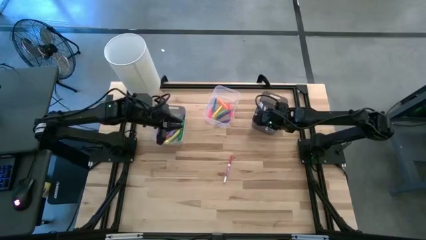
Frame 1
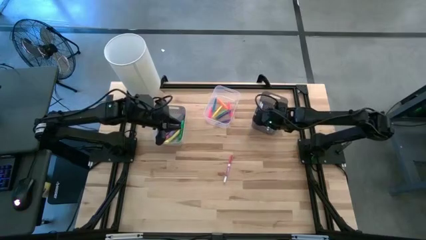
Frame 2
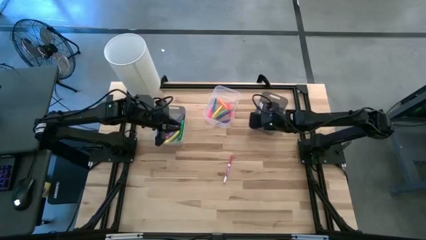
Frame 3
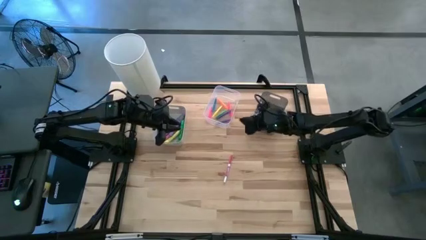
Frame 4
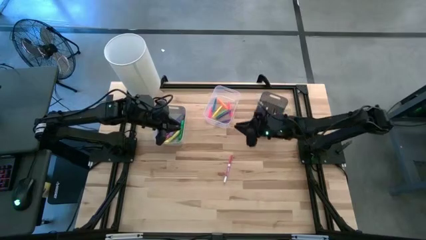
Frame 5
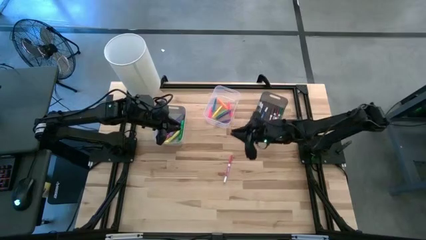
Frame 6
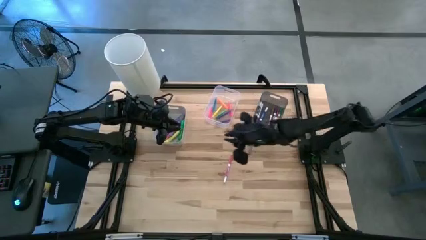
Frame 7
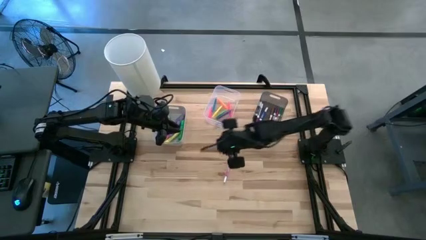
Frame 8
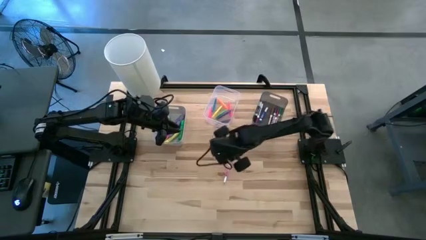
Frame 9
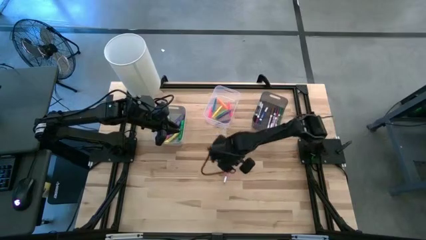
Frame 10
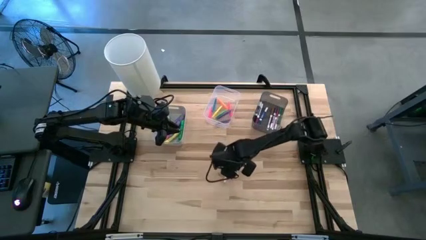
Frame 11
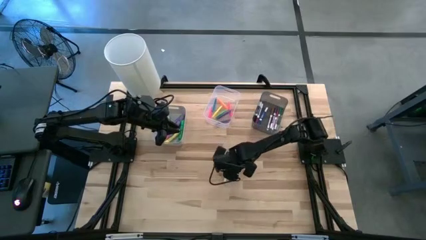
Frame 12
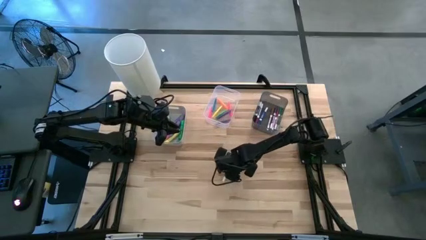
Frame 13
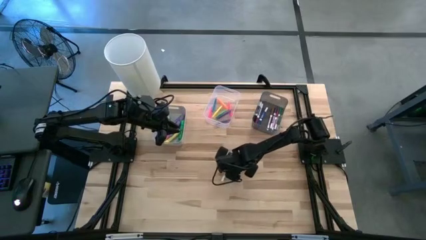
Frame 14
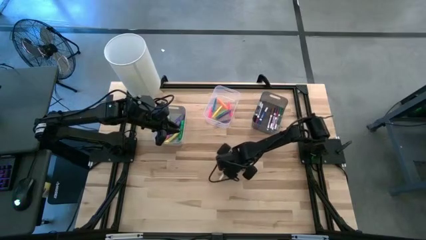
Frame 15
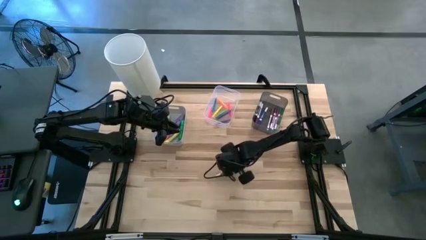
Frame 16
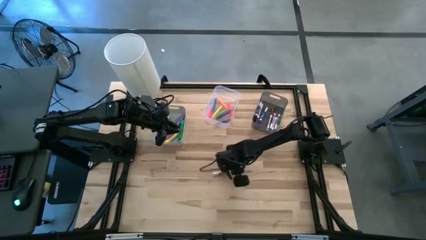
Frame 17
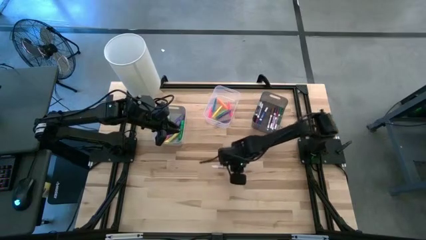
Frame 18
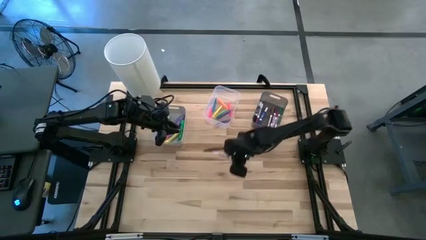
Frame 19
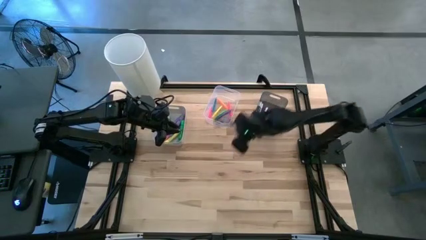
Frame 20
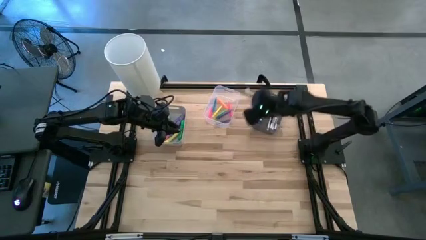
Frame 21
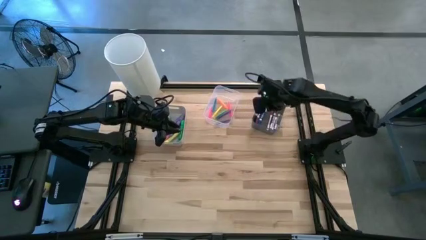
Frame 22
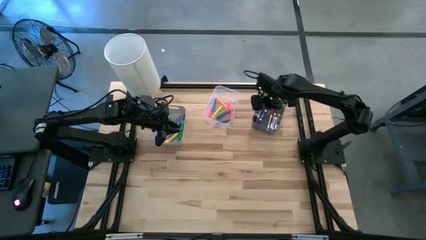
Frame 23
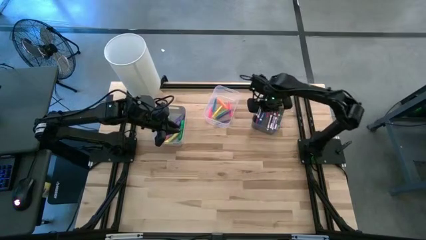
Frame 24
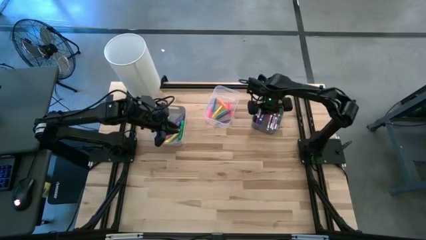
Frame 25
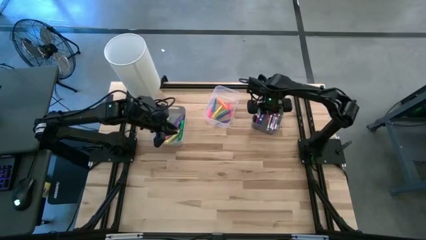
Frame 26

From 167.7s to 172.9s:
Task: Pick & Place Markers
Put the pink marker into the black bin

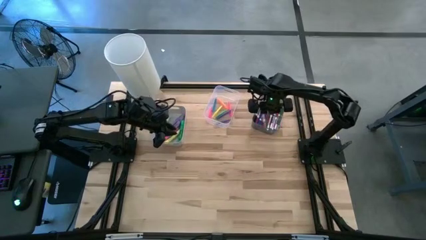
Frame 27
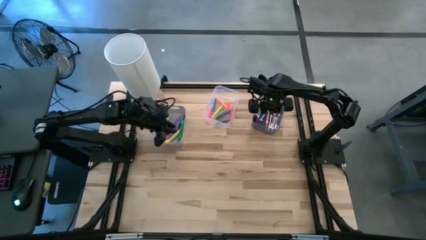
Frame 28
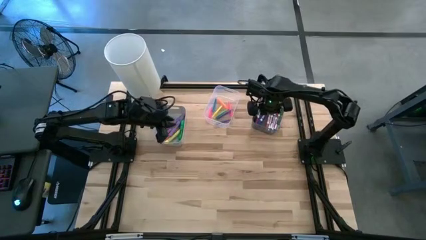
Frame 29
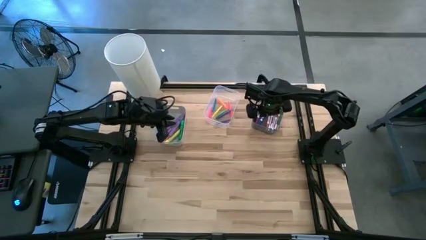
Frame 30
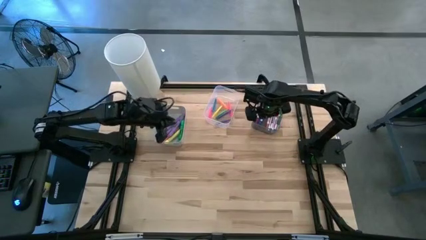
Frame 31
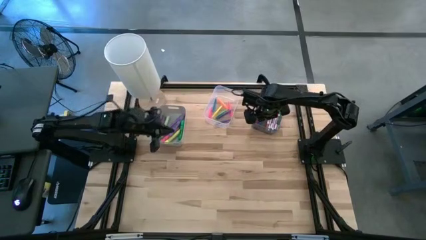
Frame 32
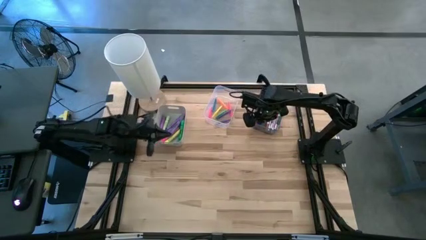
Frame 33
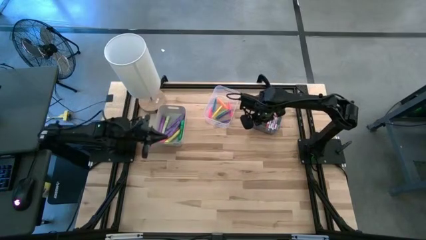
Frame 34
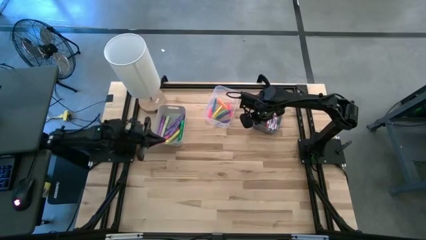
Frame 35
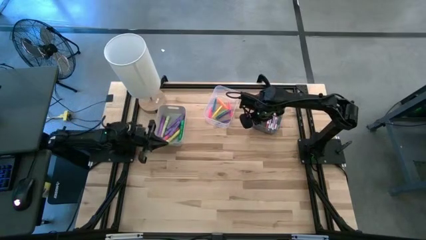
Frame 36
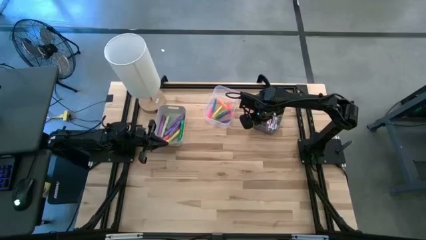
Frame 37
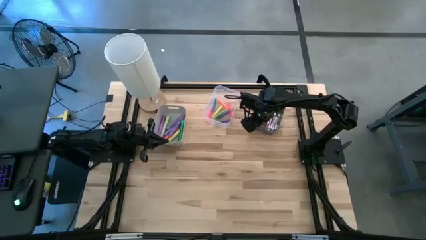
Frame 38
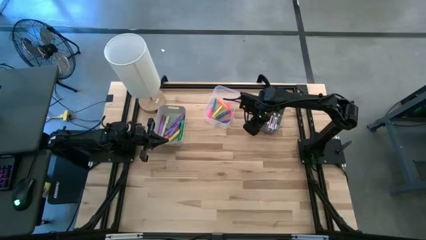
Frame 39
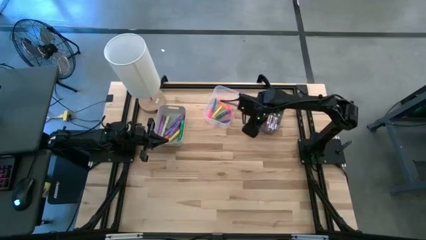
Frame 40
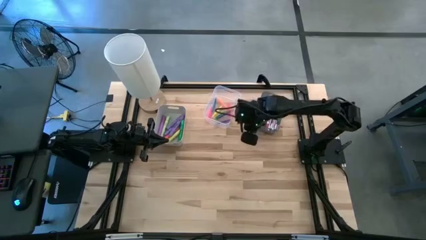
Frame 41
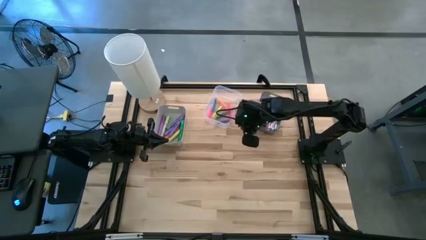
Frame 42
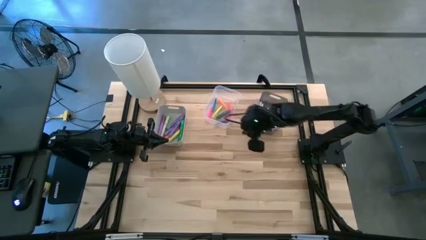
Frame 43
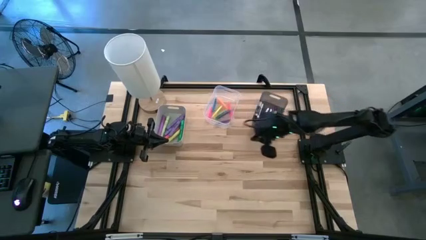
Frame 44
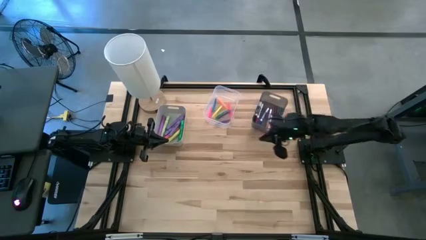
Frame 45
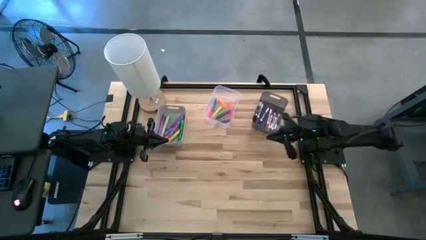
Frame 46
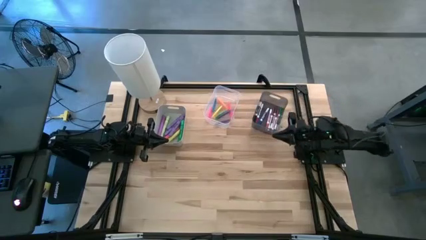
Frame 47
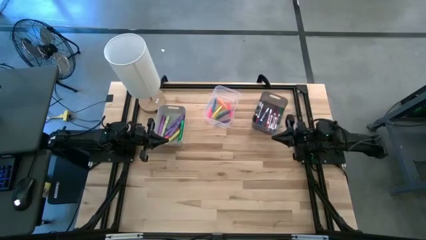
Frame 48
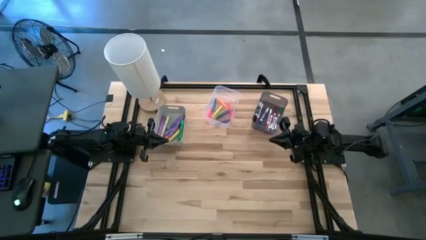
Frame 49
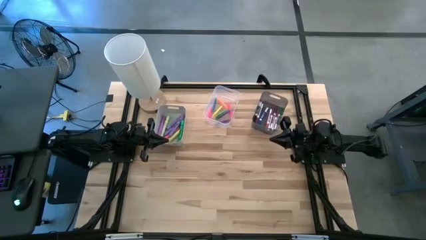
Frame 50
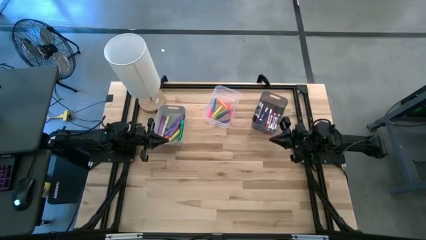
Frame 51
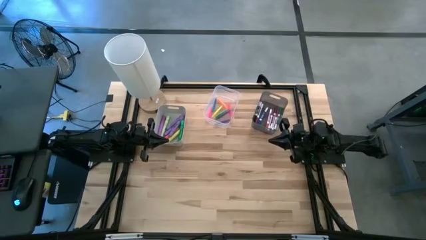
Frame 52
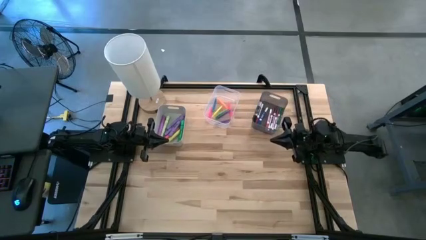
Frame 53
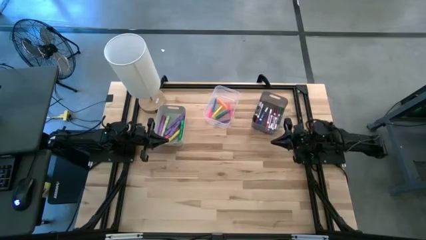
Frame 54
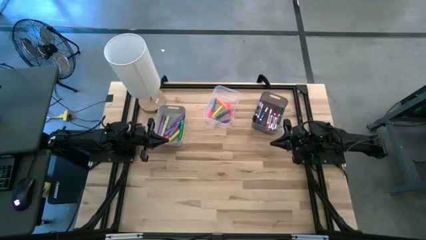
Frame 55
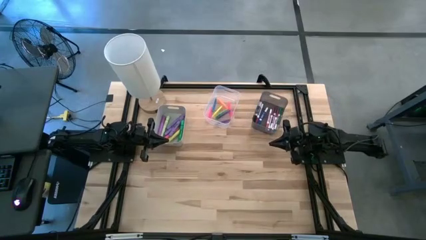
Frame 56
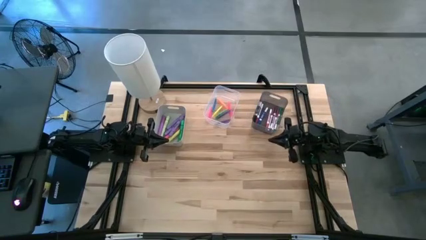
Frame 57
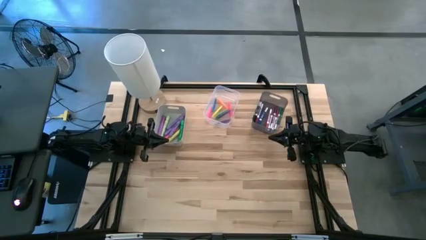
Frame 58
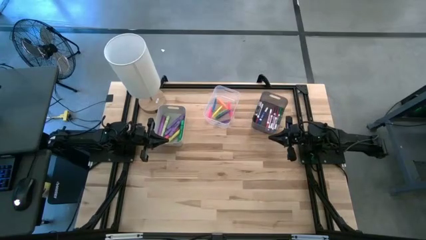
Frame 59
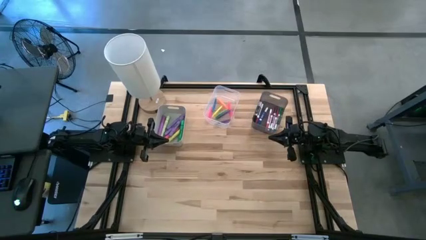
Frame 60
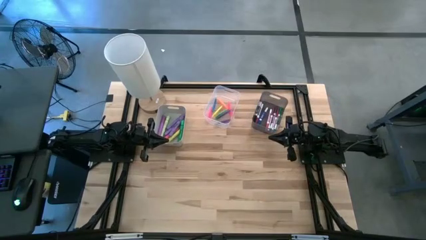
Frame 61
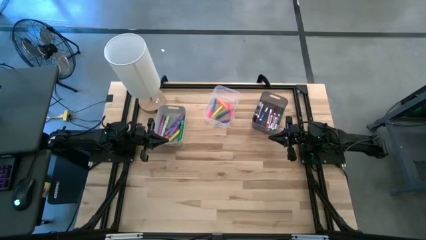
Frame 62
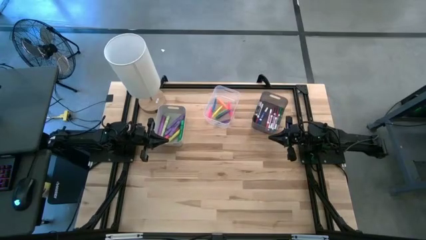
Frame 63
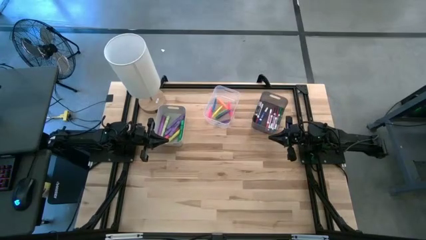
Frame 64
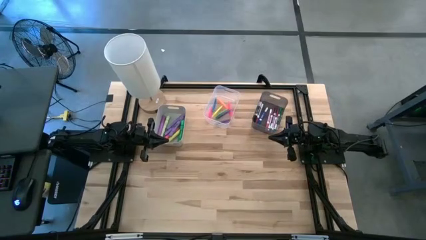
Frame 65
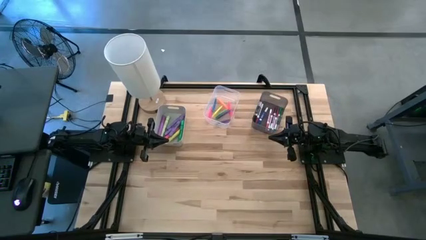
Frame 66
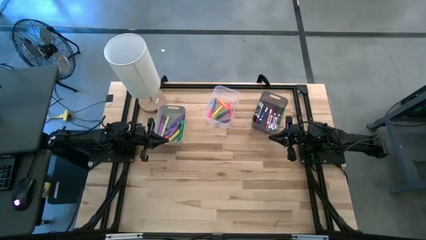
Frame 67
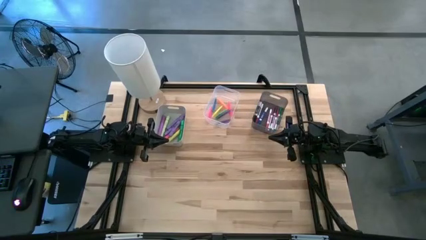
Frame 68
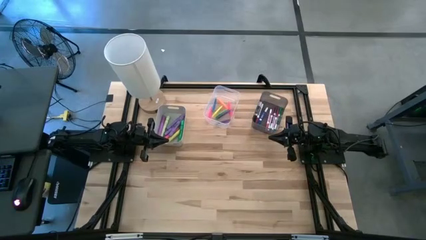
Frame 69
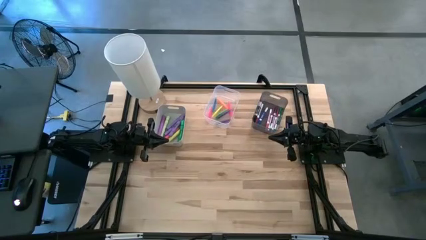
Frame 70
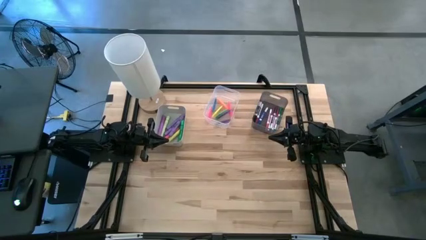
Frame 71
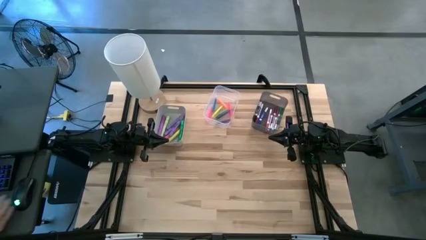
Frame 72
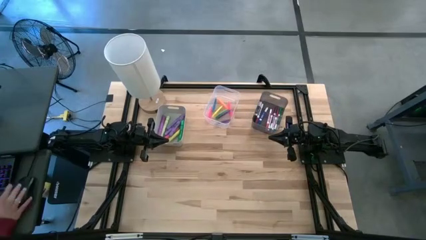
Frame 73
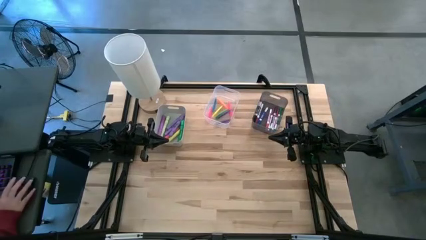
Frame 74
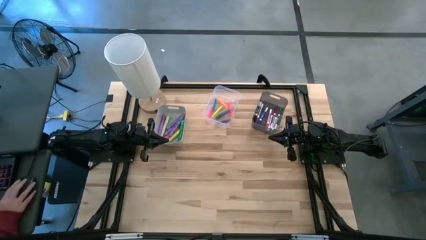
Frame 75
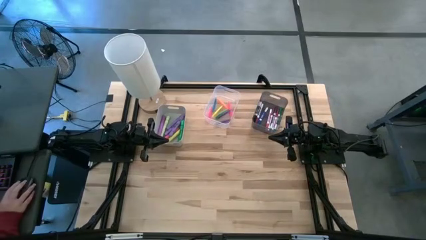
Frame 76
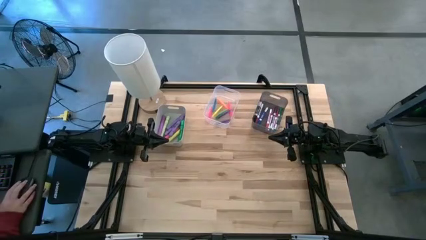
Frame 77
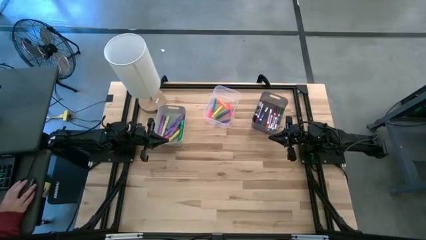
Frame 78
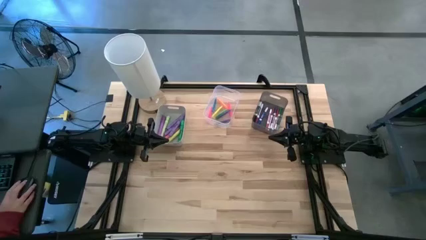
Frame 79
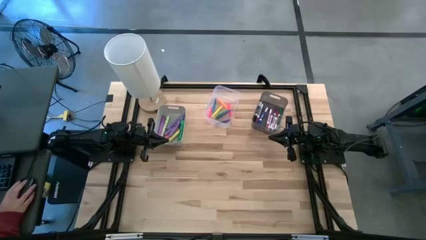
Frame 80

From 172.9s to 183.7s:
Return to Home Position
